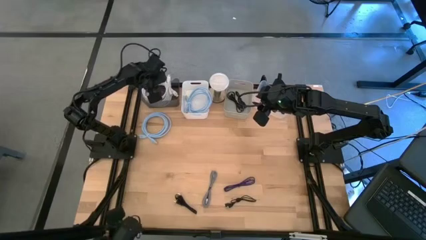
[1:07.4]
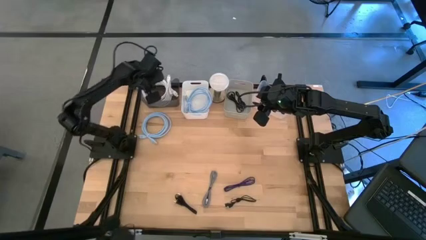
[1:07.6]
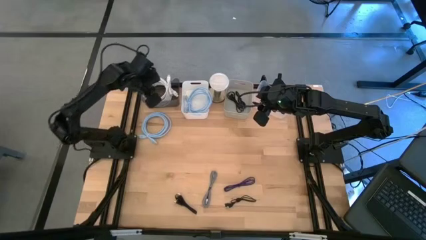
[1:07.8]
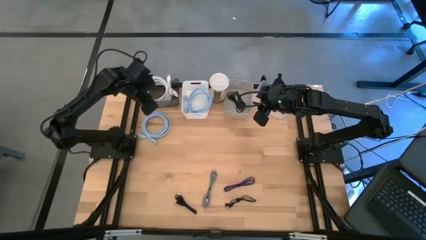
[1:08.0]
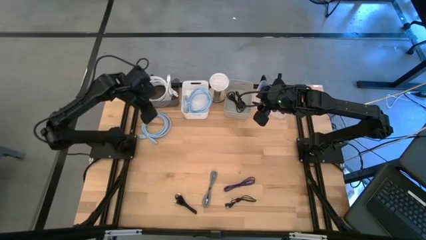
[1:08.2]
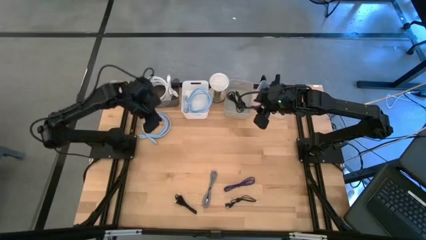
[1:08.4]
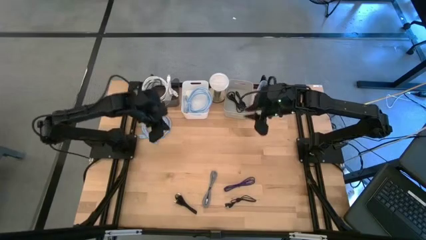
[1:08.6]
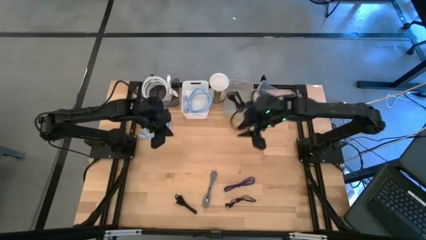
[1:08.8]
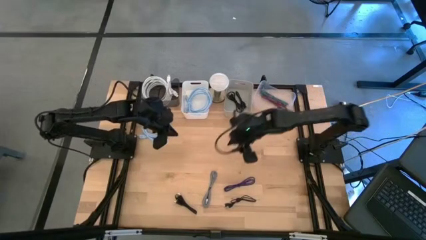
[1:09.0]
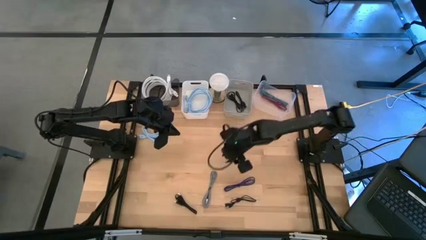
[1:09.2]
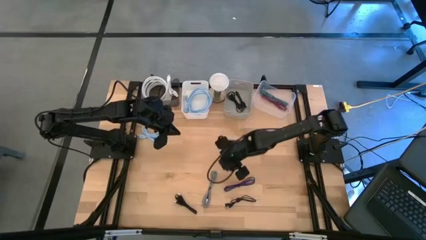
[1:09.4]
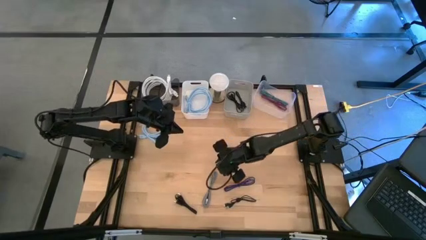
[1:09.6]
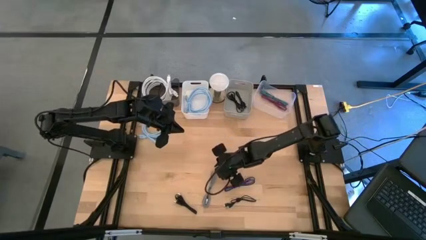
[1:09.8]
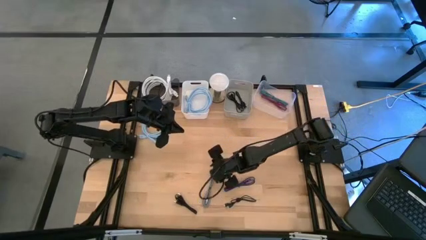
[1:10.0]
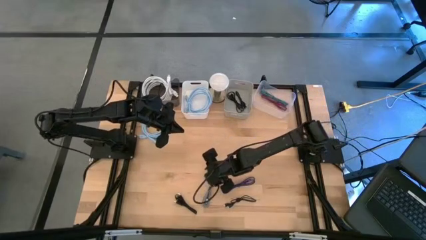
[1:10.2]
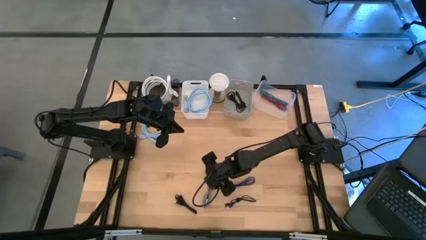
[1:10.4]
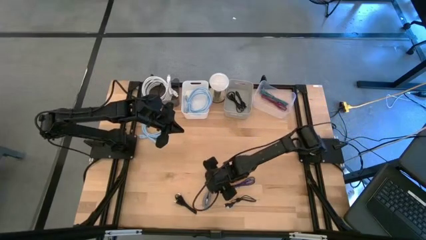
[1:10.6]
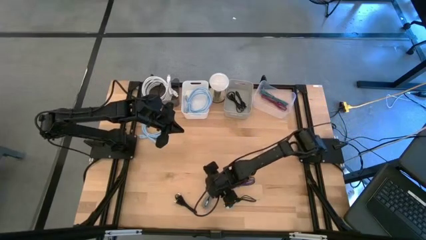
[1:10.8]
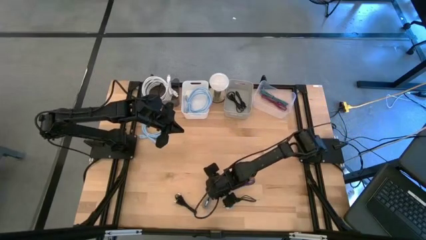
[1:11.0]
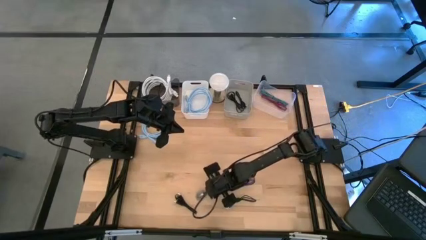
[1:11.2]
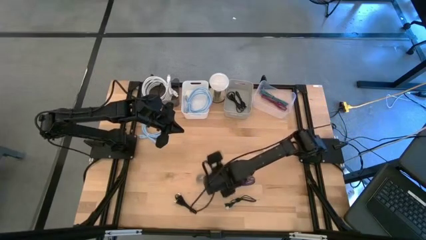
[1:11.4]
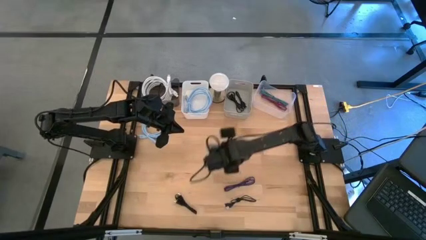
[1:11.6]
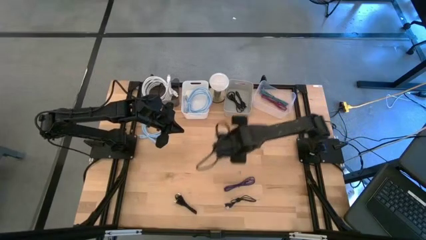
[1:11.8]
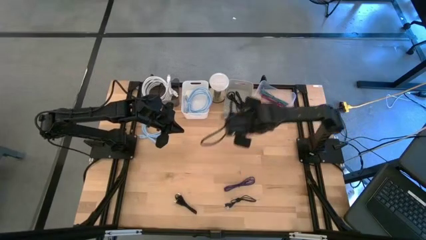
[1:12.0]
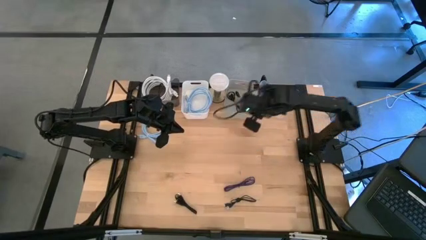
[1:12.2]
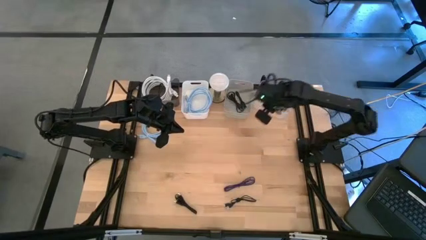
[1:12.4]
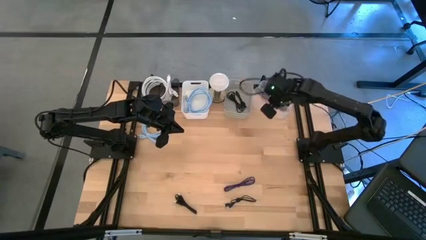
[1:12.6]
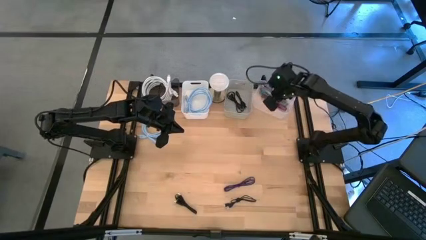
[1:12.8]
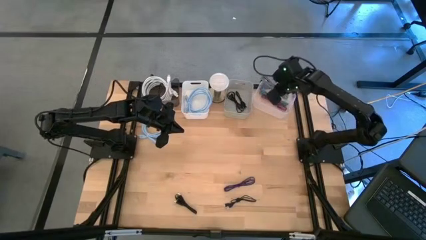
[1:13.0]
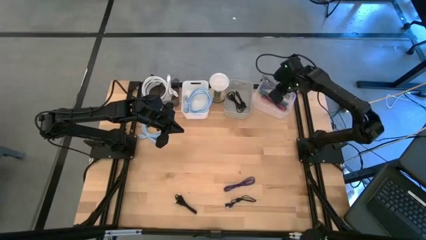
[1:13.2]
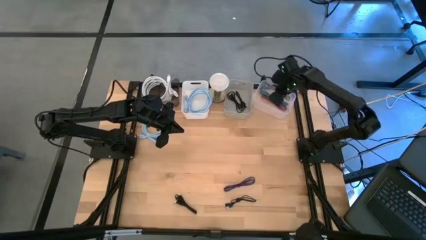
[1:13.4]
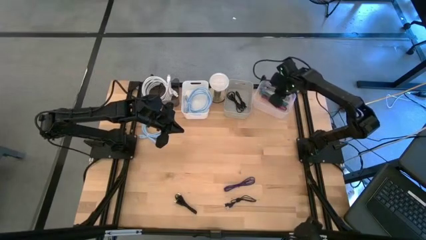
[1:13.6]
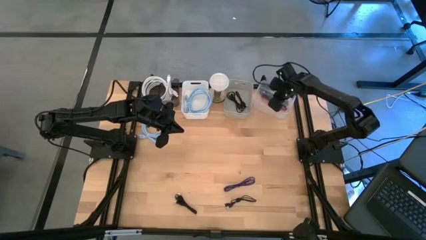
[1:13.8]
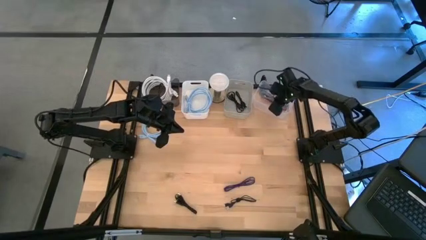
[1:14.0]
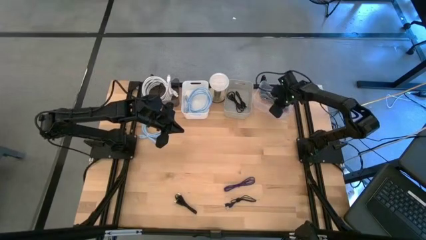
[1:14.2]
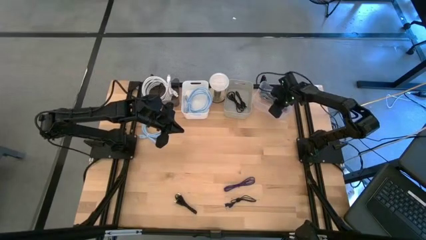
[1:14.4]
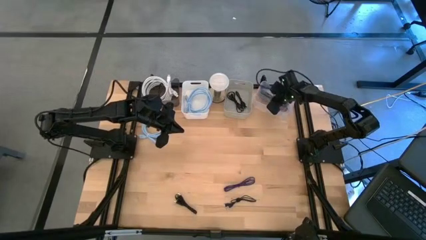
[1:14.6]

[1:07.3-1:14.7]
Task: Pick & Place USB Port
Put the black and white charger cable into the transparent bin

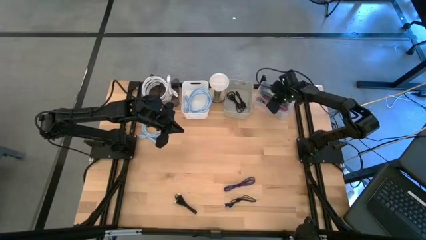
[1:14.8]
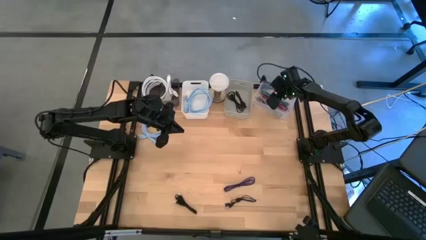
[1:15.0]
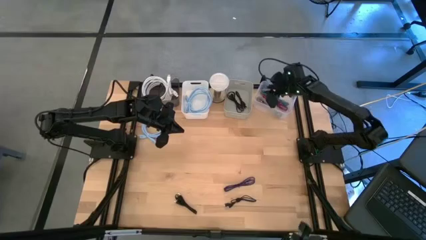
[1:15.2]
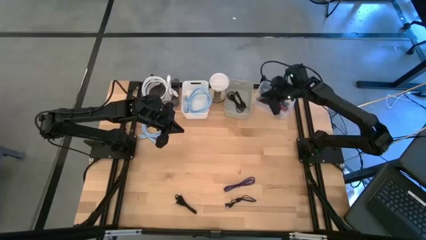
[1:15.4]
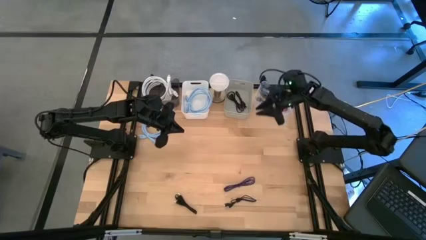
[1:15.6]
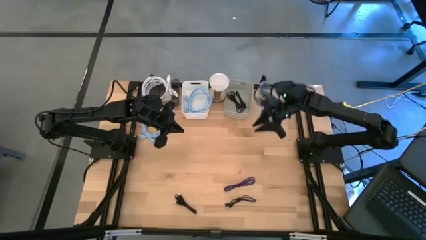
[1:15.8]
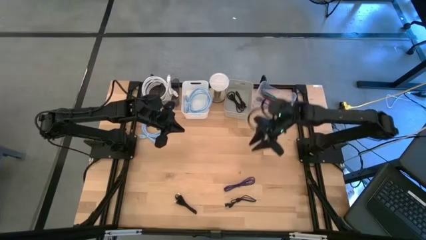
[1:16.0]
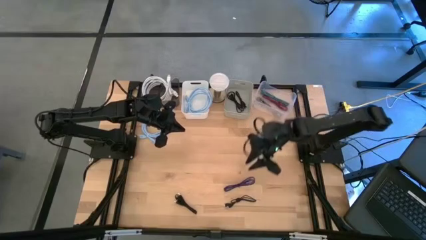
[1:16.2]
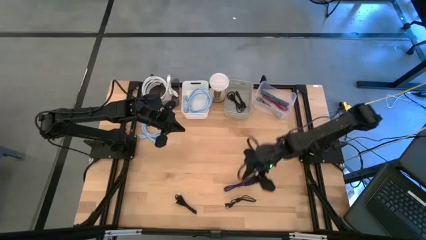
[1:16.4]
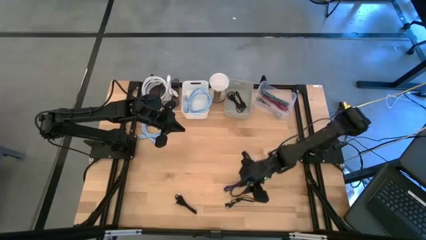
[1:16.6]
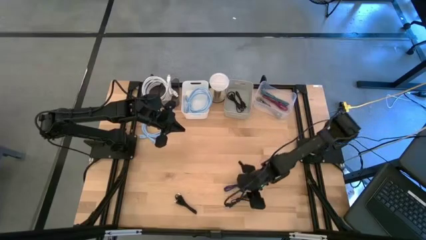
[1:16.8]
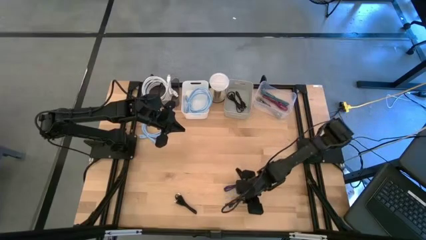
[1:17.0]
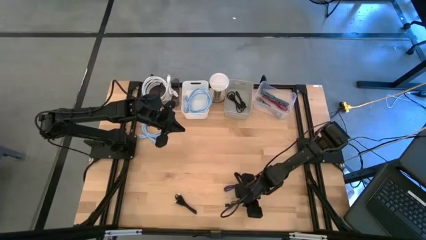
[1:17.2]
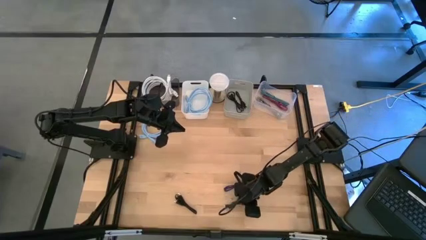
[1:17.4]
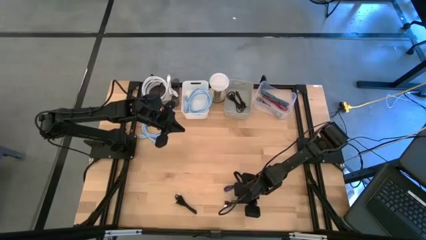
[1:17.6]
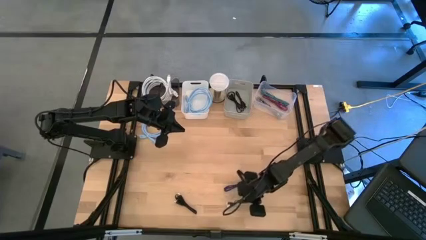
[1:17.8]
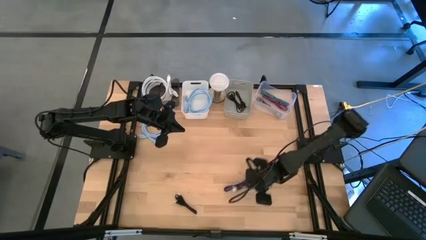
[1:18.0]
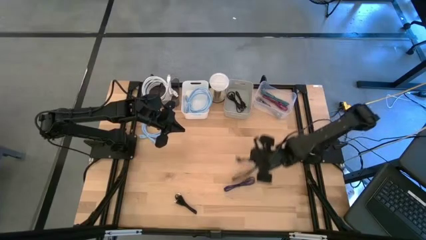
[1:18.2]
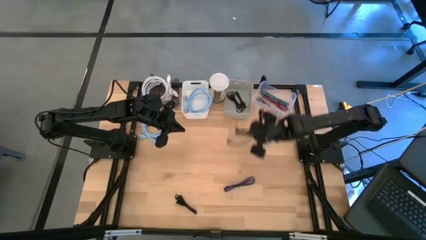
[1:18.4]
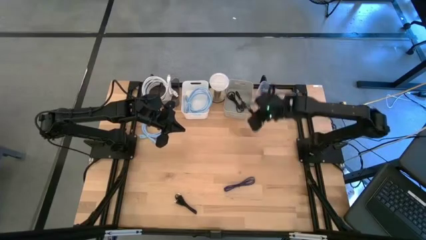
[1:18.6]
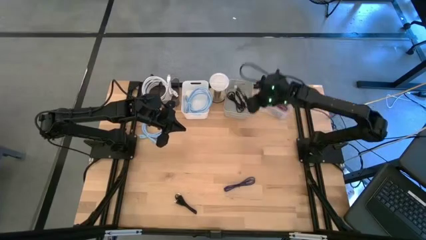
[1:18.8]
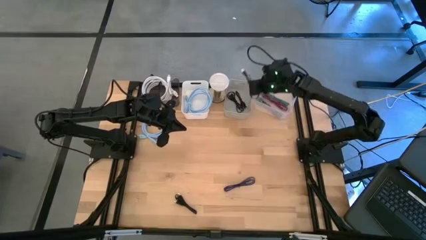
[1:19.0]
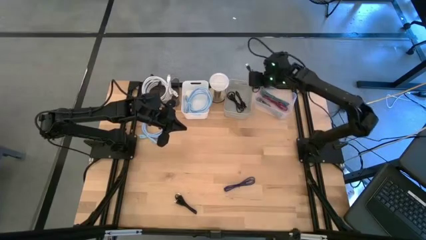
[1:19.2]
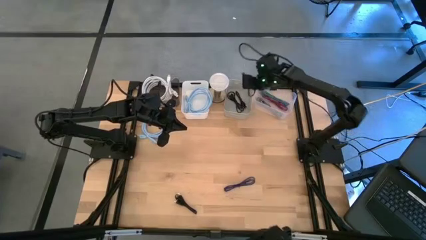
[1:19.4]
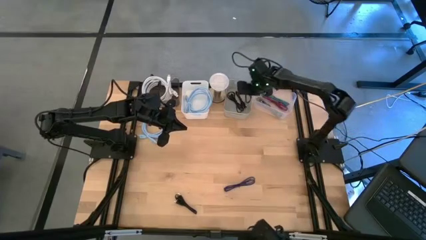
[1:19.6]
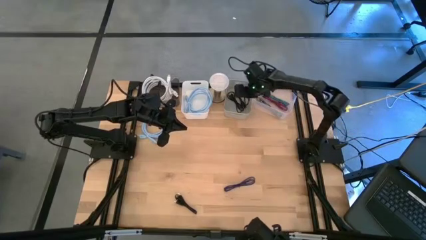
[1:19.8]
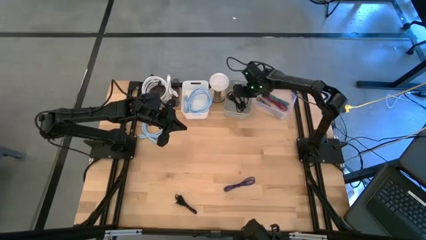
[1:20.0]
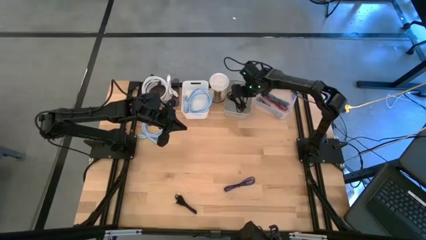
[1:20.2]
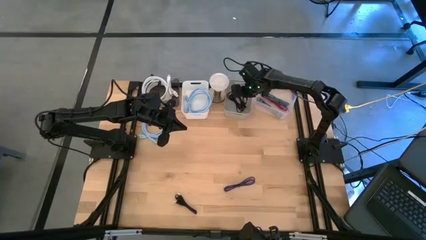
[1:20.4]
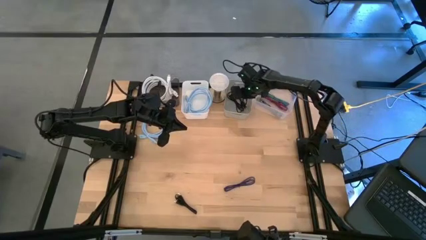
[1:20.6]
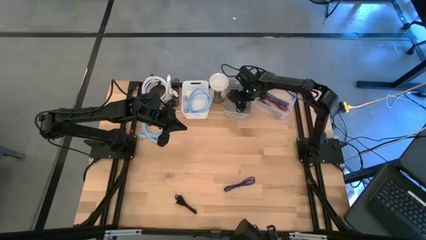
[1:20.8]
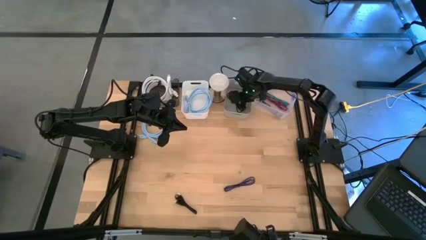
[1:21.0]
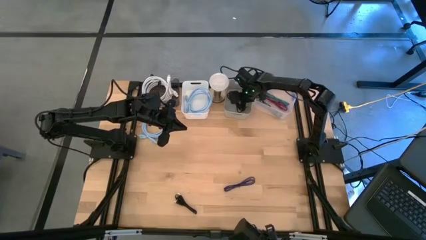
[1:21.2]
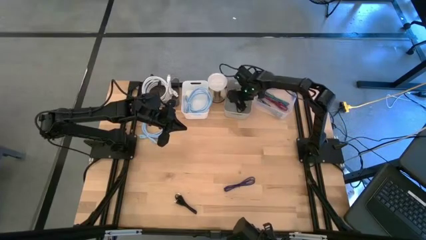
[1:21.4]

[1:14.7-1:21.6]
Put the black charger cable into the gray bin

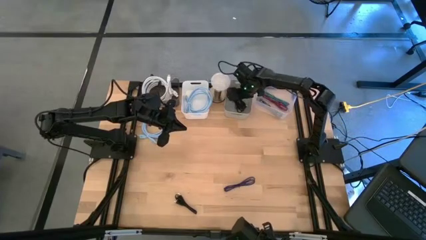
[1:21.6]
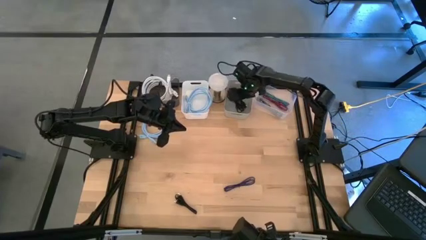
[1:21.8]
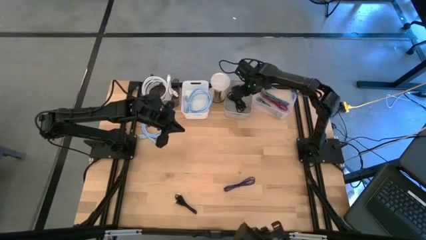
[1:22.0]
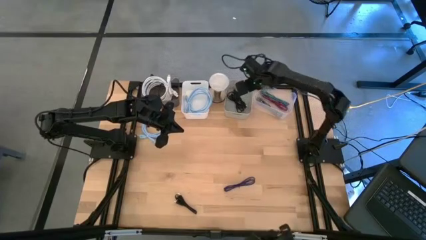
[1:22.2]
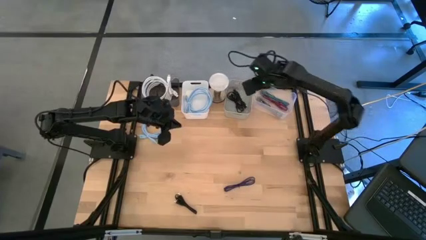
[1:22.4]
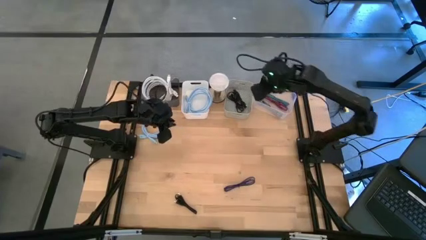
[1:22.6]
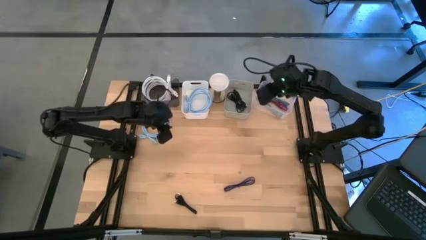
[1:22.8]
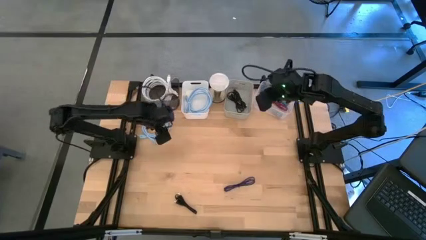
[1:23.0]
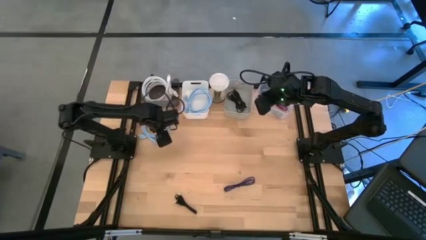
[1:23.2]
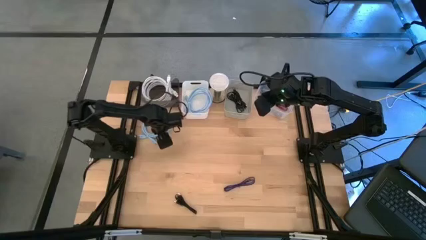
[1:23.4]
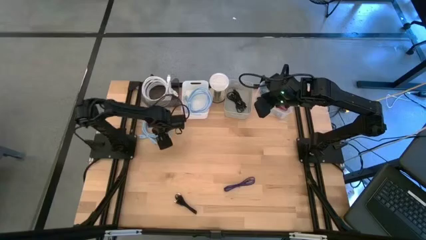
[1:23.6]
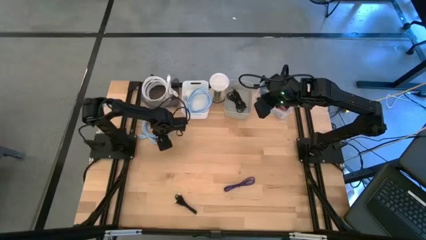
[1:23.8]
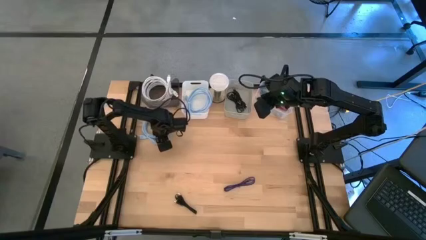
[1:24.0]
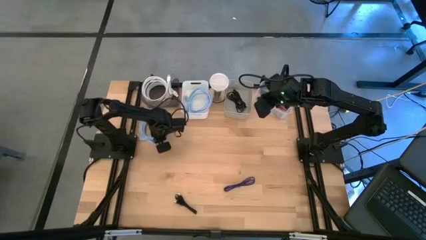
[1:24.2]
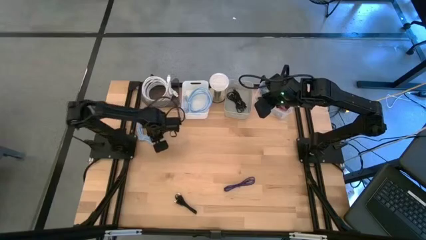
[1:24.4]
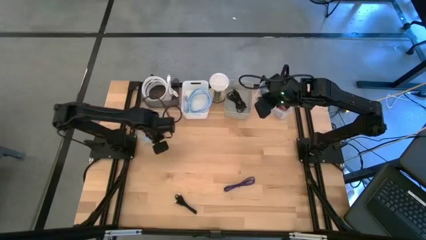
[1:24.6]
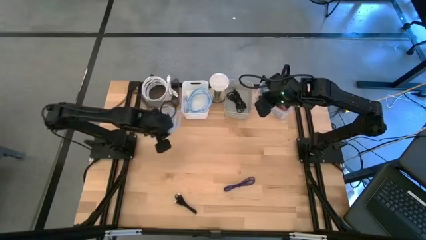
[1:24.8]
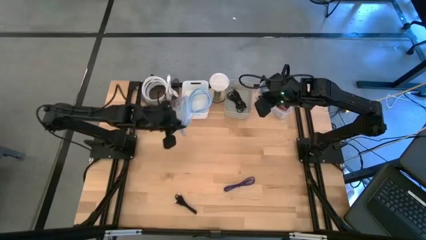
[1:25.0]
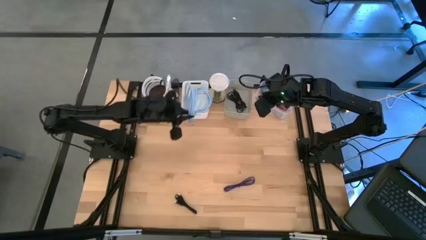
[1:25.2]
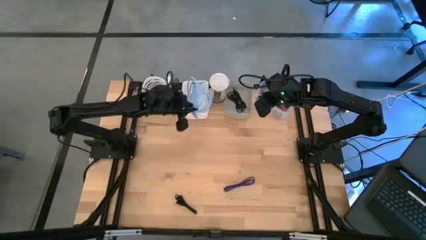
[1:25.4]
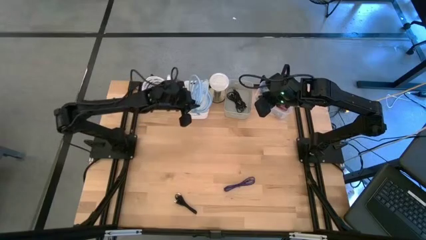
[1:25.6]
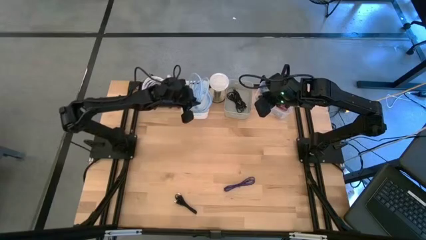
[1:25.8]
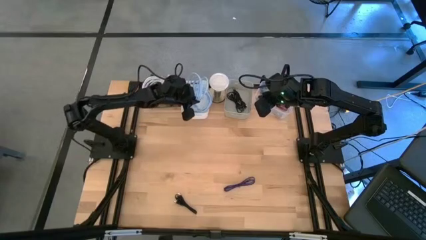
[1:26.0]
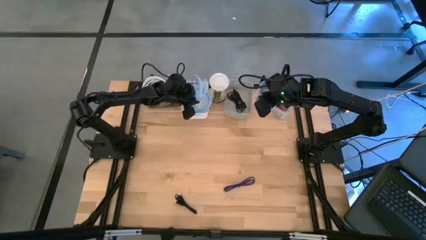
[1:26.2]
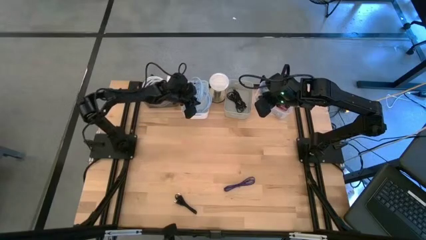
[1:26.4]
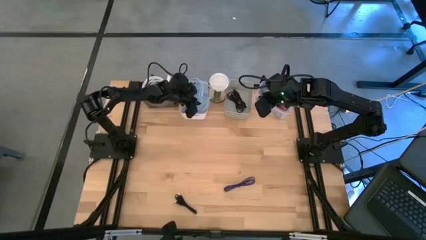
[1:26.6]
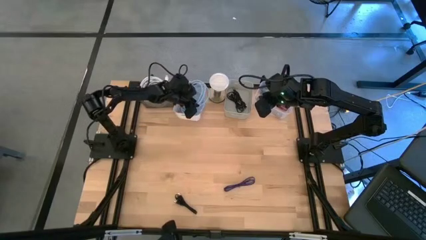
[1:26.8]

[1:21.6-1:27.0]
Put the blue HDMI cable into the white bin
